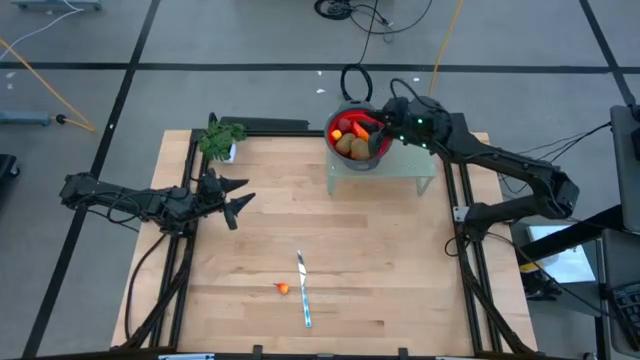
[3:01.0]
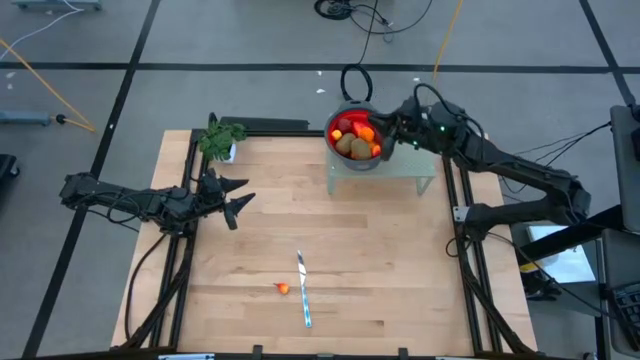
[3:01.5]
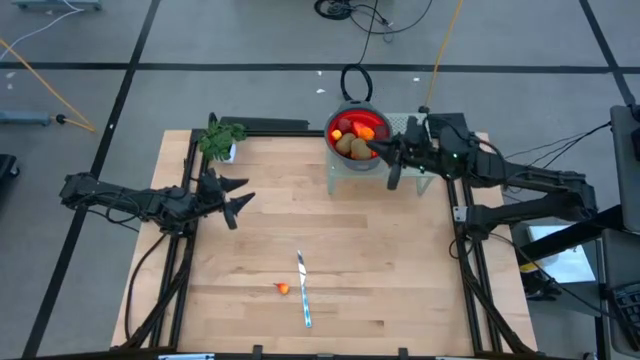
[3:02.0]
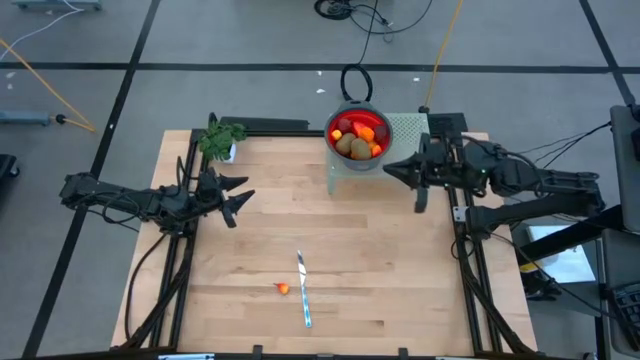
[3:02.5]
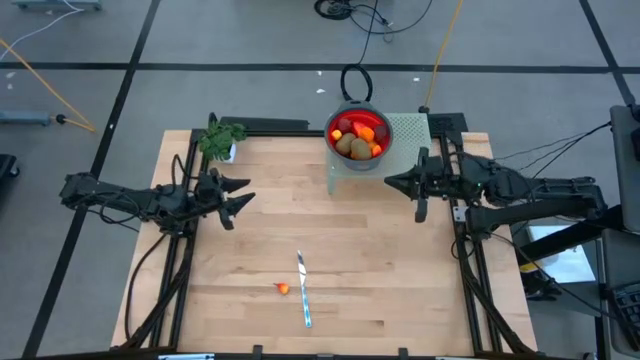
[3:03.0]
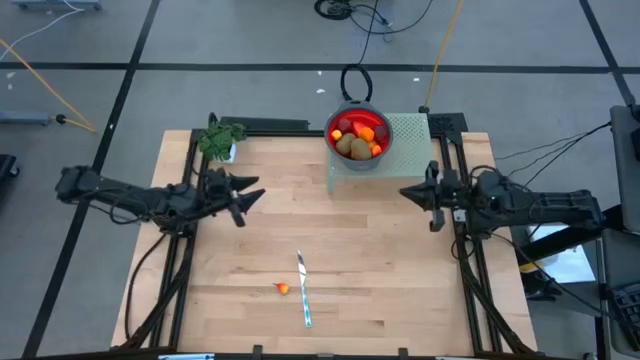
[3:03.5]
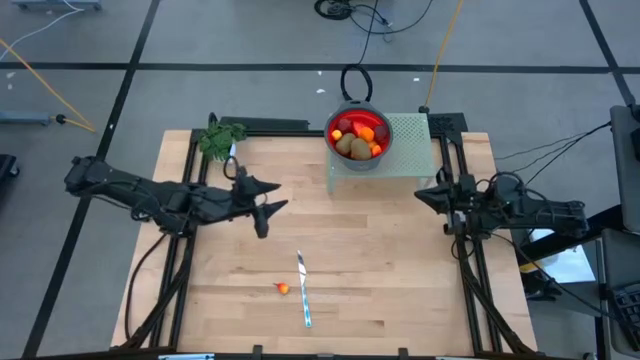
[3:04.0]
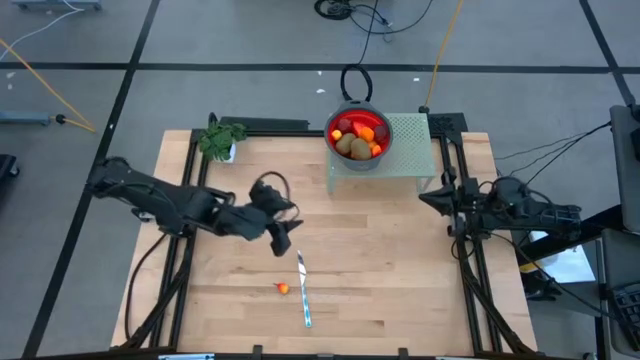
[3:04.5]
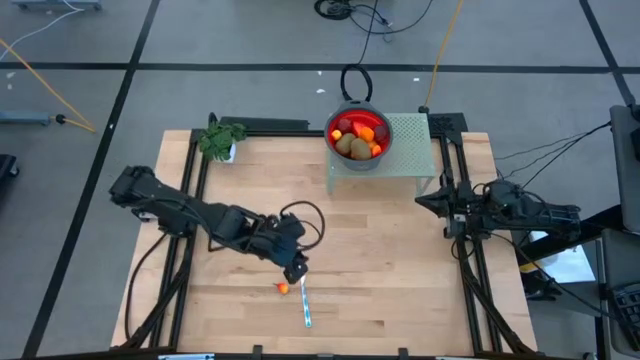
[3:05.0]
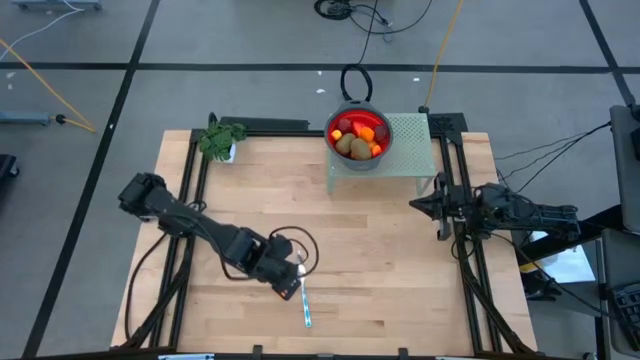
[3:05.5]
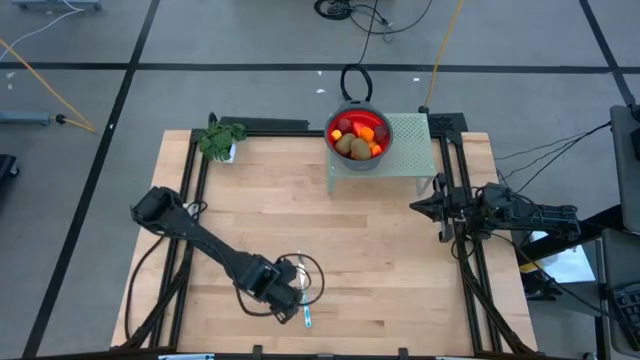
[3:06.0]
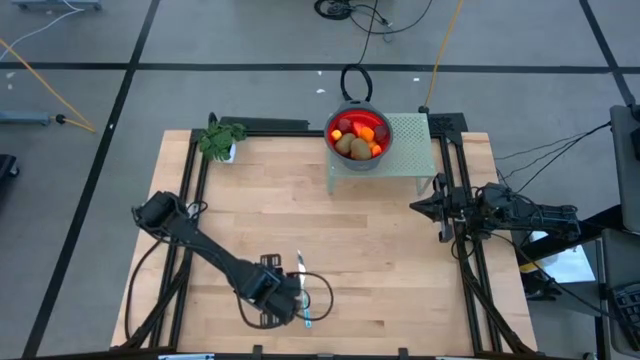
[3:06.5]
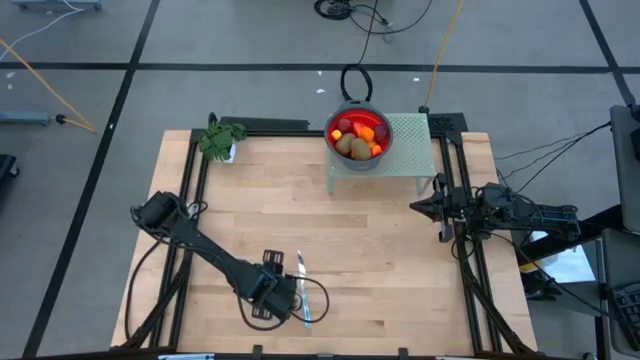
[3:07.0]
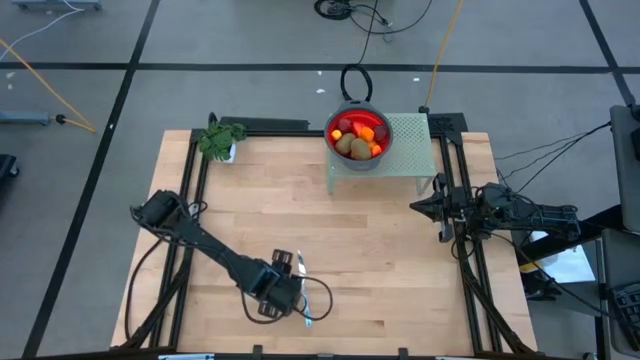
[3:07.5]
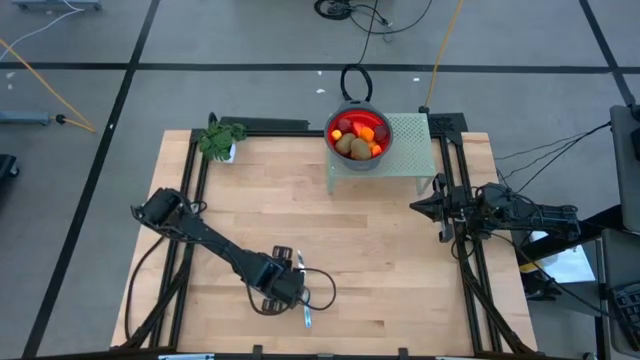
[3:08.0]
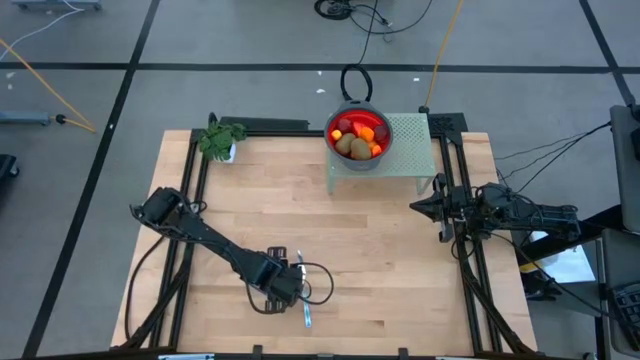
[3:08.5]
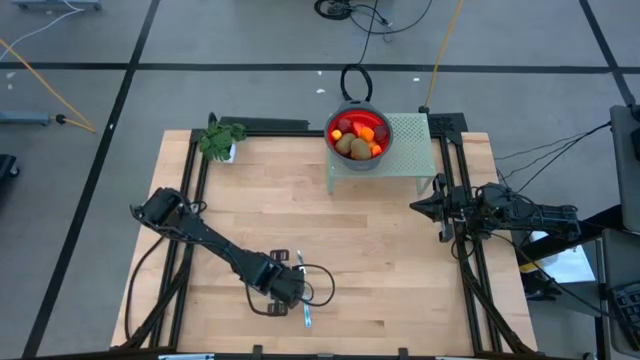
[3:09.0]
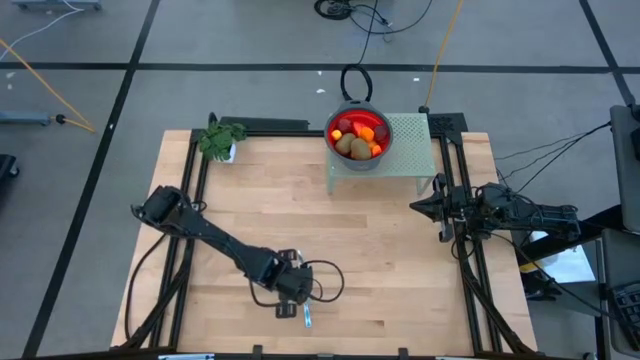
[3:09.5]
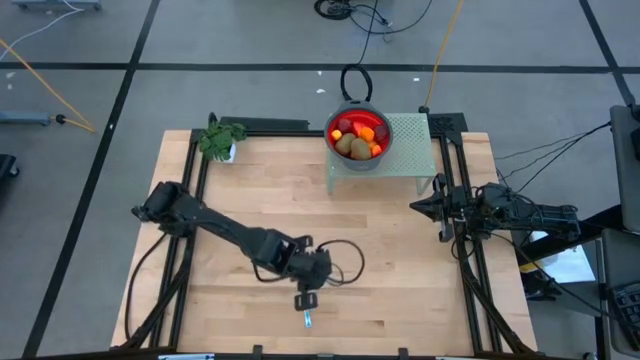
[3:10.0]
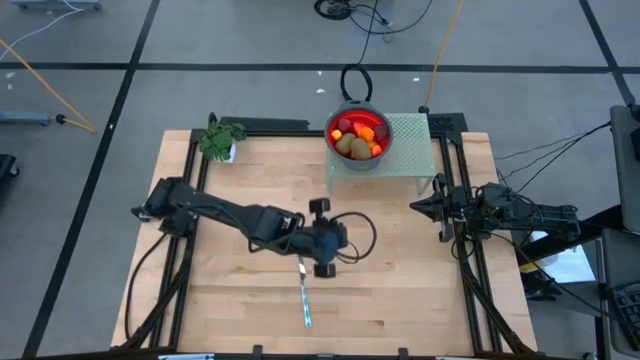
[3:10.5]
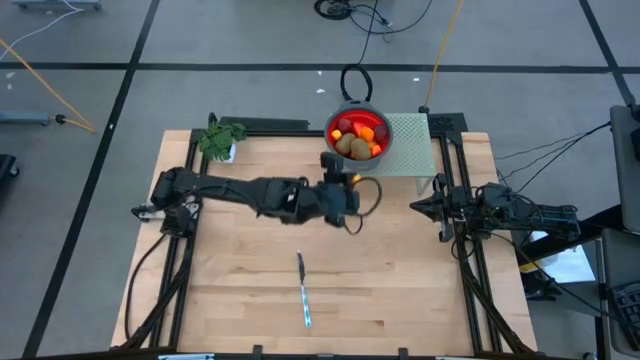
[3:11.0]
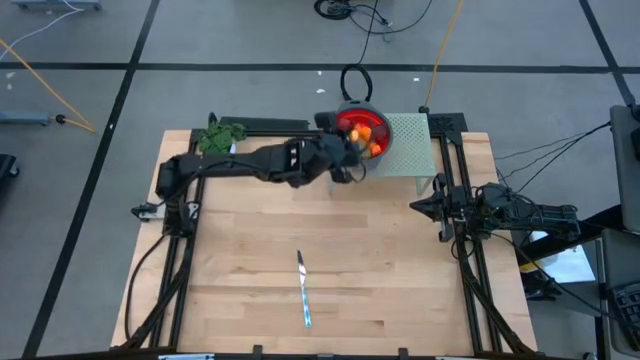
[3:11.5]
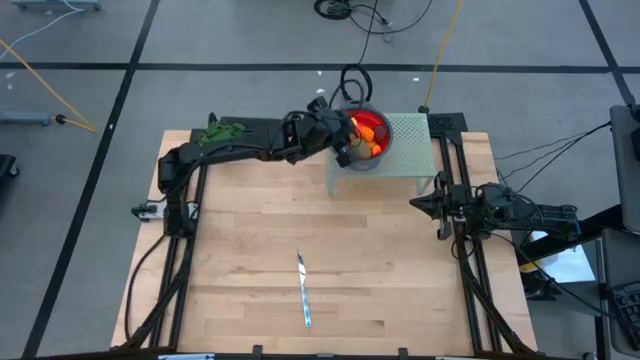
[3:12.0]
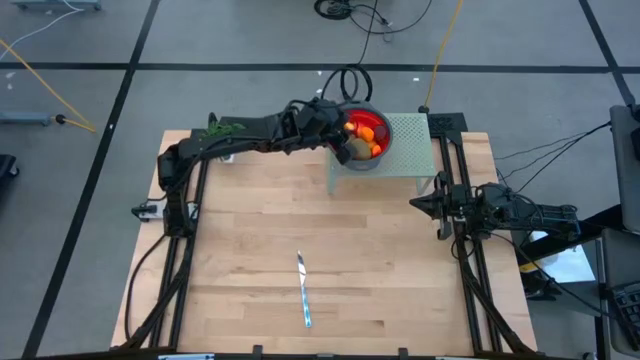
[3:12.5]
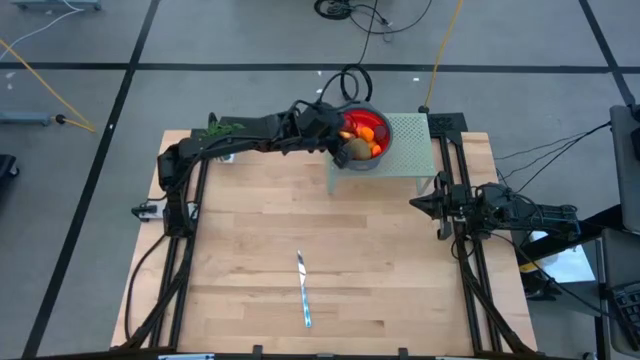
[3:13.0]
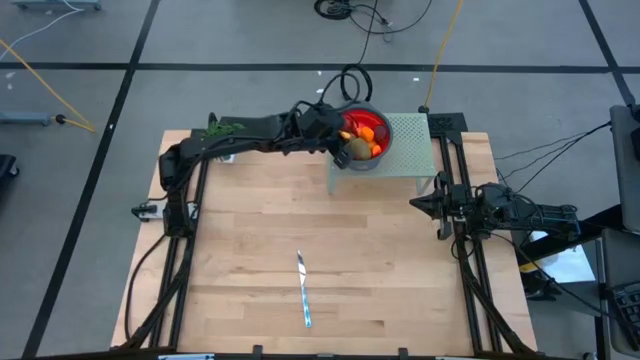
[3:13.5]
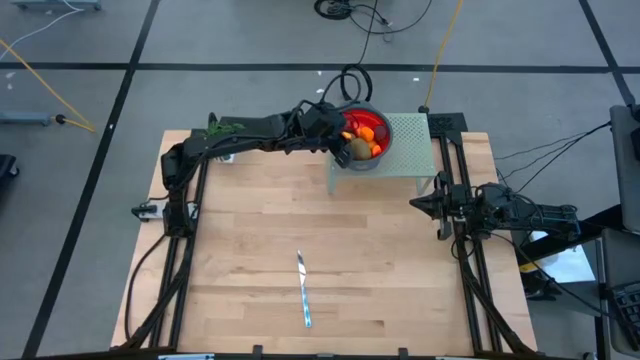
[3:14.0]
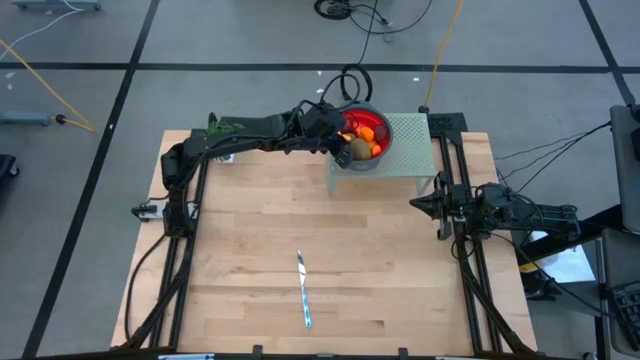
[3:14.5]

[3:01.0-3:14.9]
Task: Pick & Place Fruit
Put the peach into the red strainer bowl on the shelf

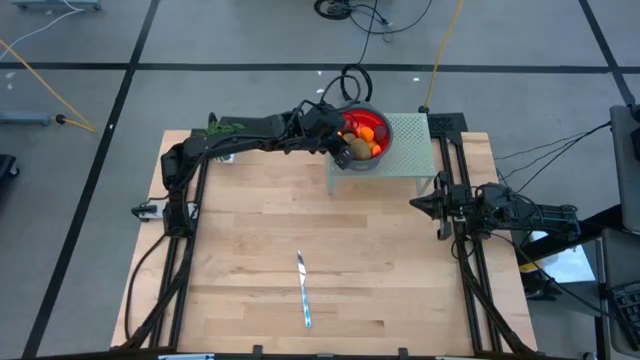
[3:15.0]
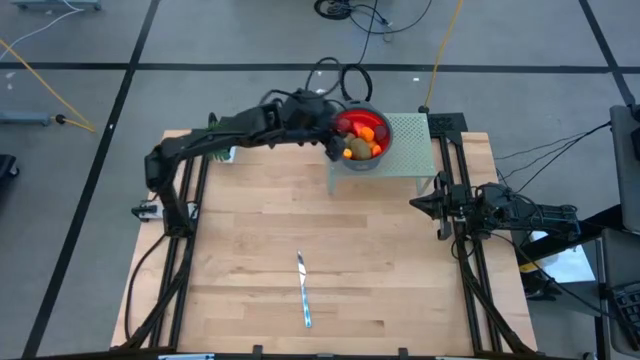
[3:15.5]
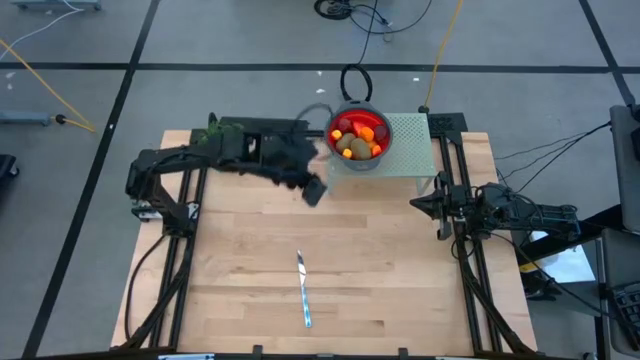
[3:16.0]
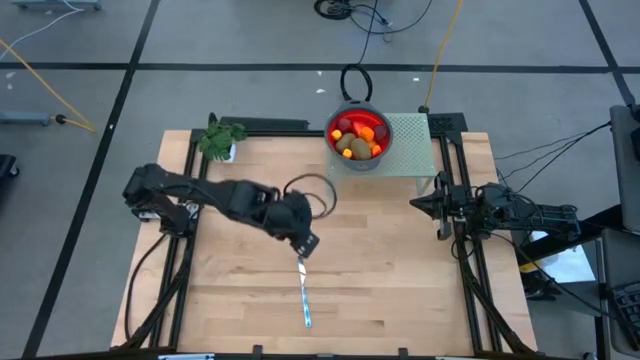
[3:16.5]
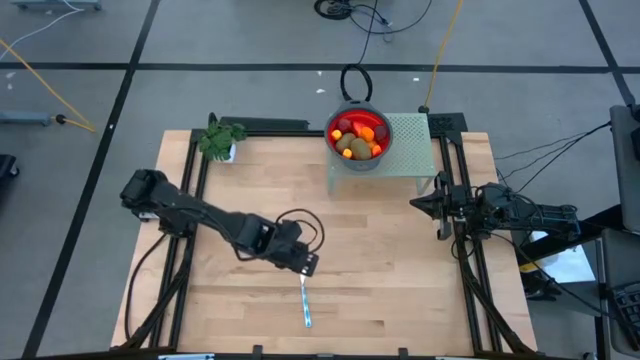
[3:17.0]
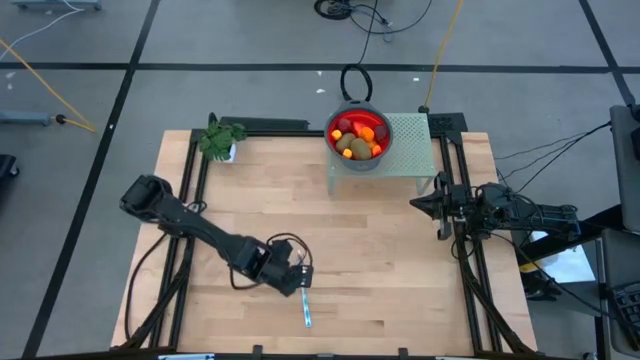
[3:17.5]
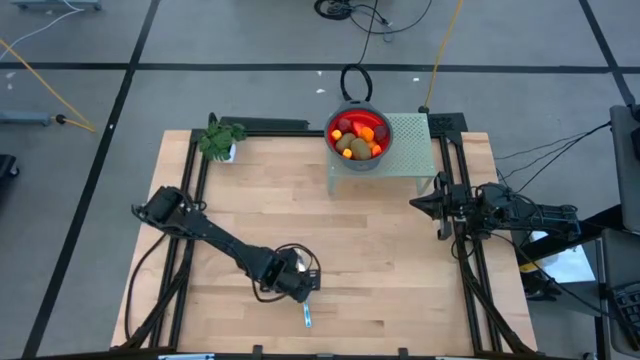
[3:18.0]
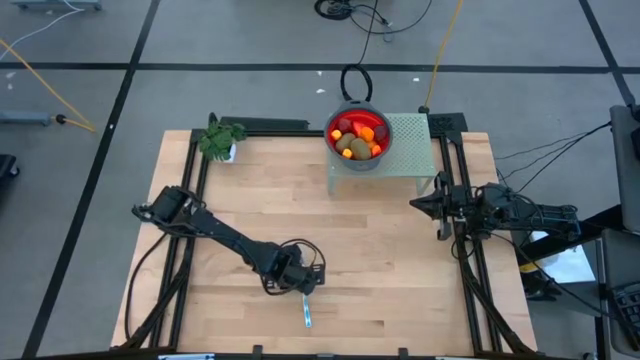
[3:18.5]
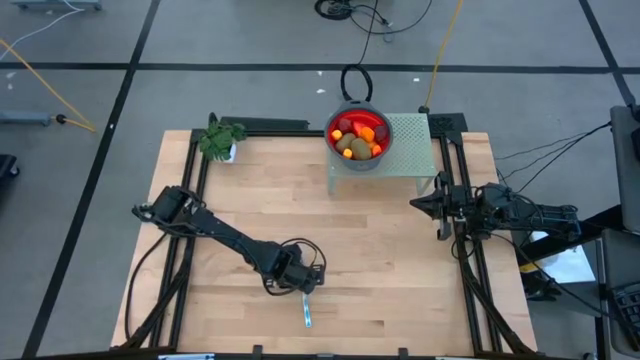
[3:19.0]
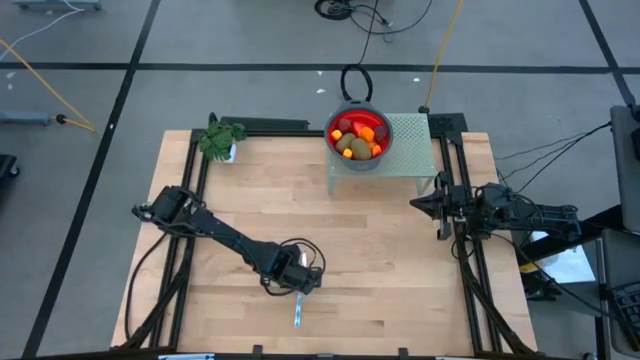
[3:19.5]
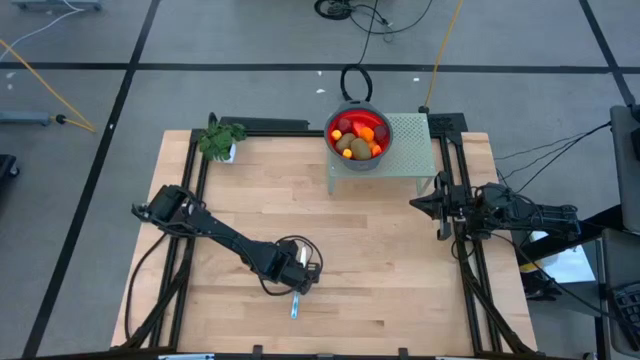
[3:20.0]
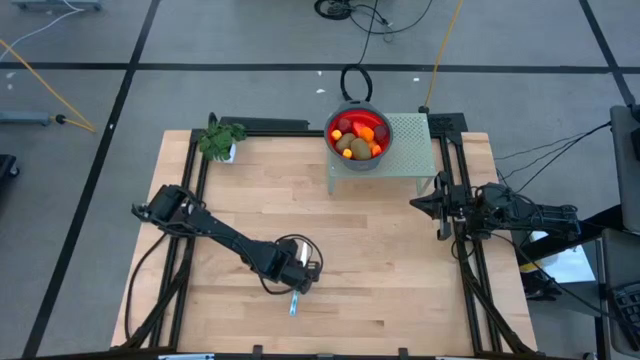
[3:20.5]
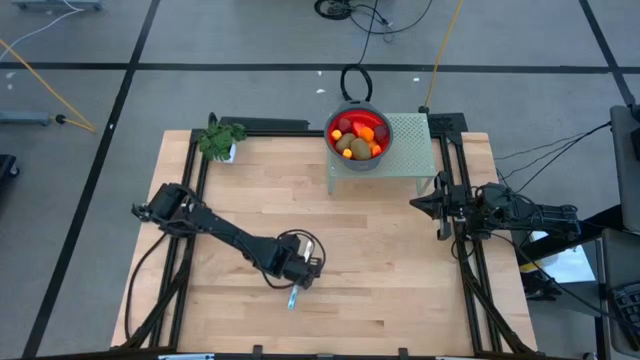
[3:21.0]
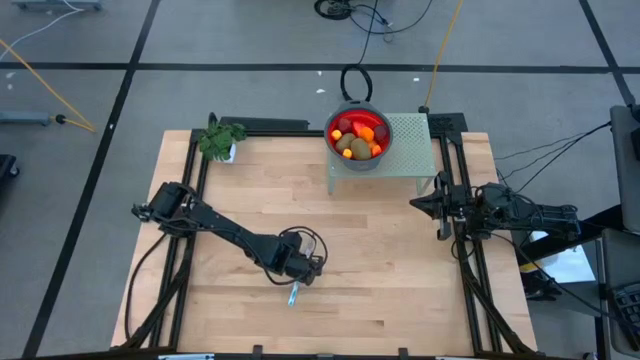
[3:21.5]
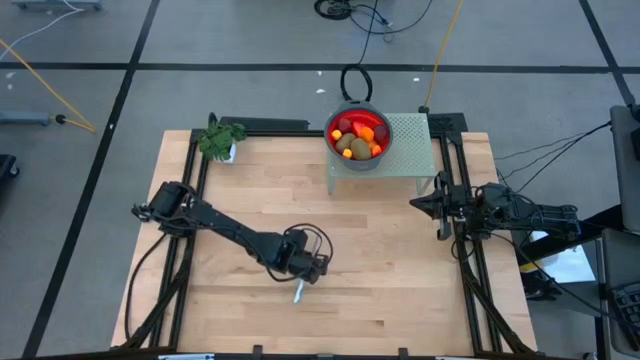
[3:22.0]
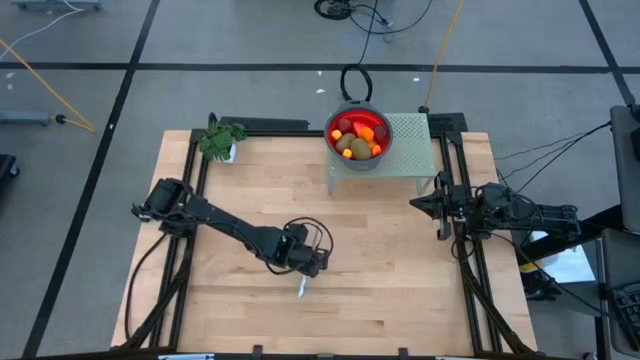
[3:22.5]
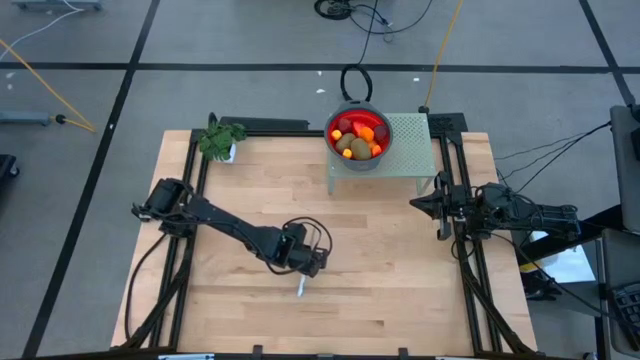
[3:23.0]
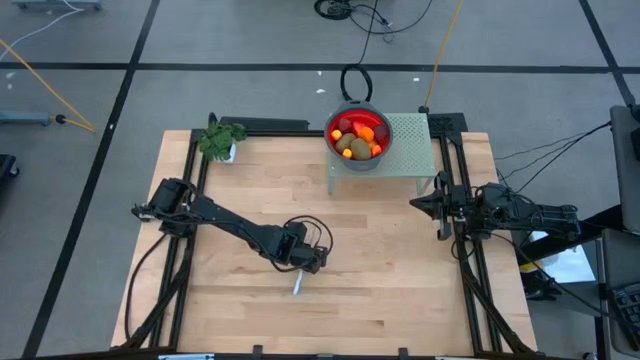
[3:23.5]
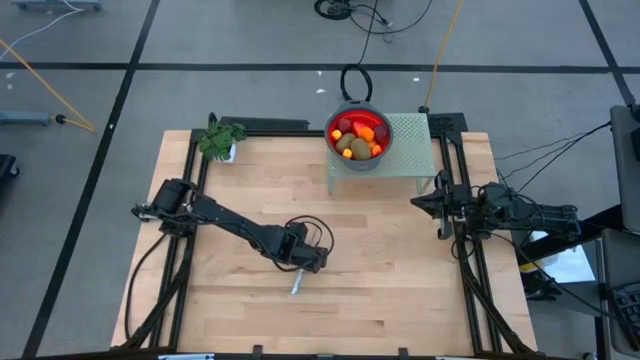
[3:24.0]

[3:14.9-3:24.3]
Put the white table knife on the shelf
